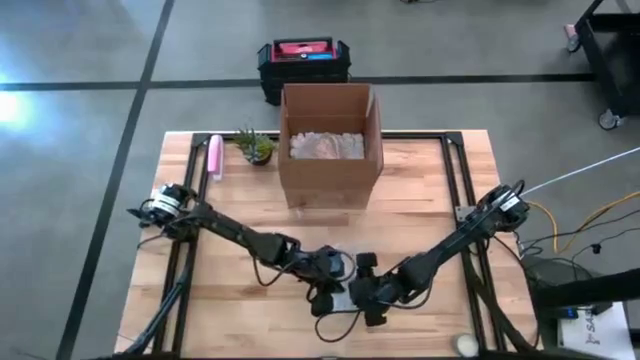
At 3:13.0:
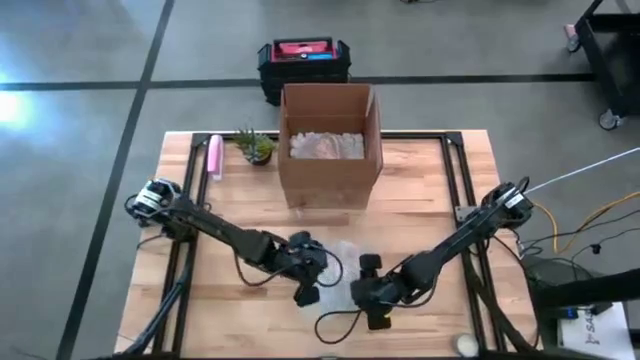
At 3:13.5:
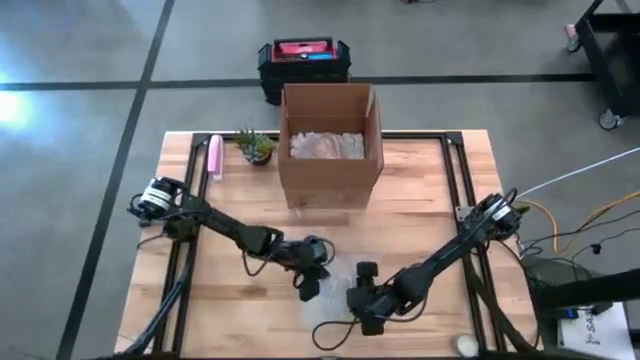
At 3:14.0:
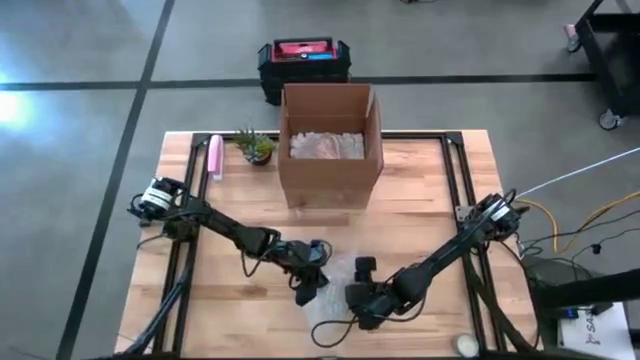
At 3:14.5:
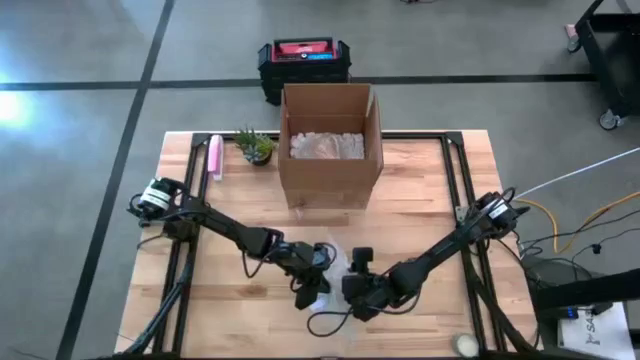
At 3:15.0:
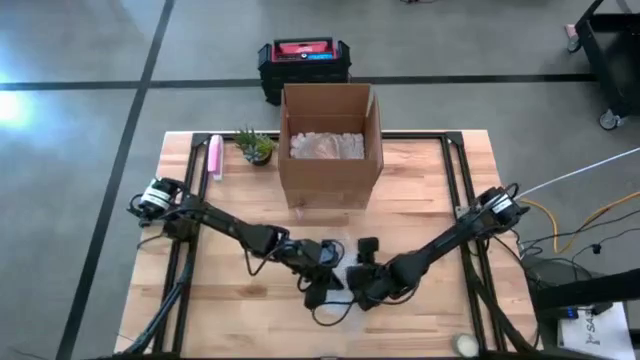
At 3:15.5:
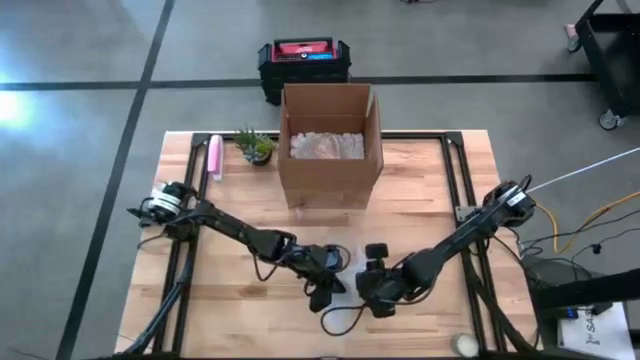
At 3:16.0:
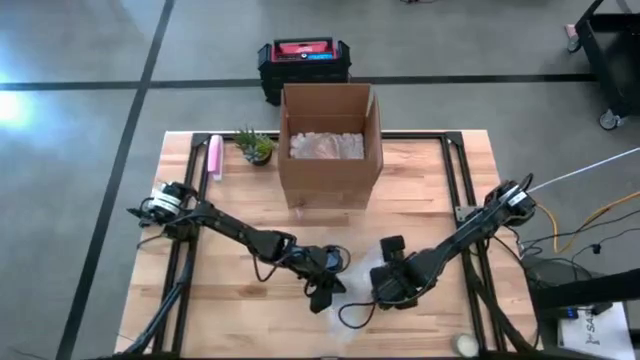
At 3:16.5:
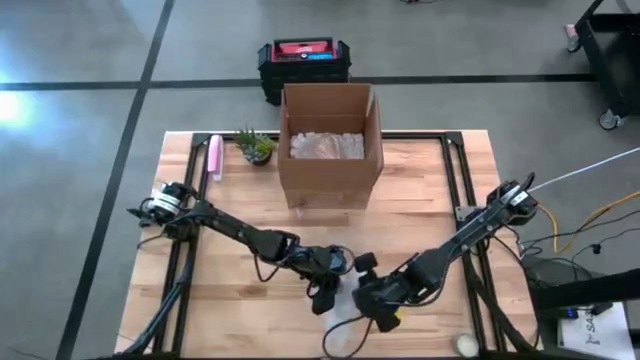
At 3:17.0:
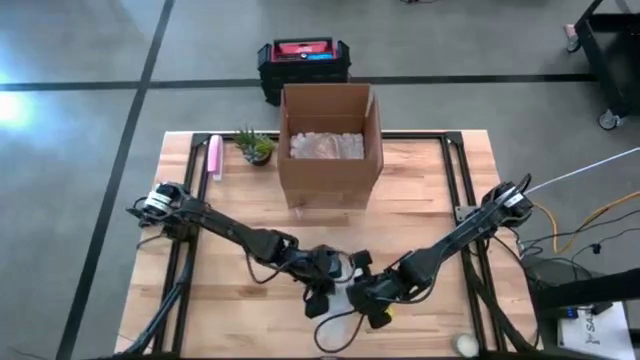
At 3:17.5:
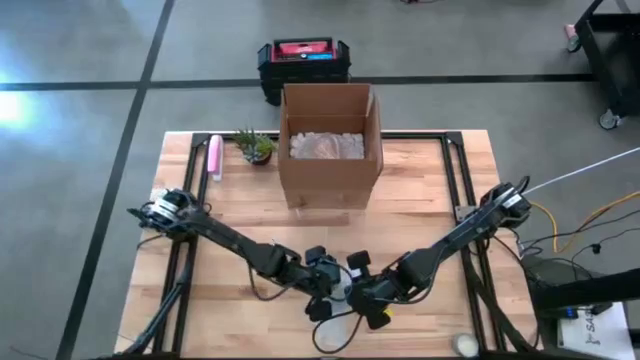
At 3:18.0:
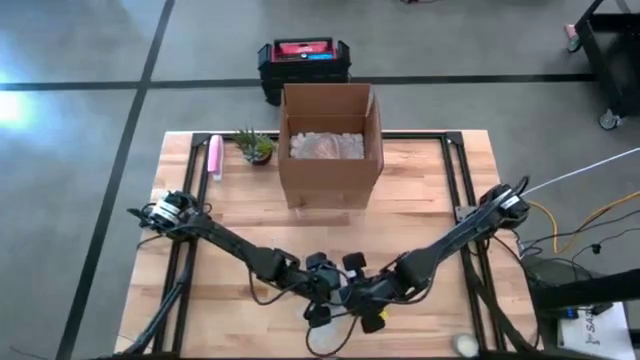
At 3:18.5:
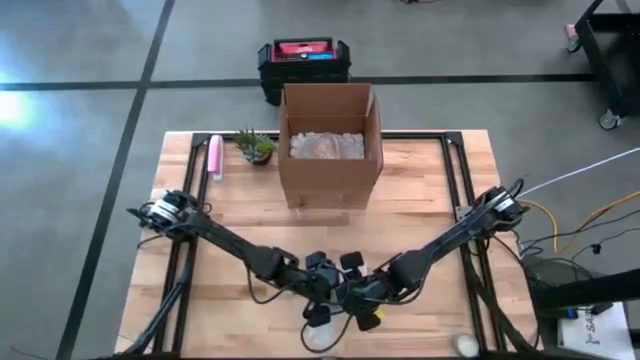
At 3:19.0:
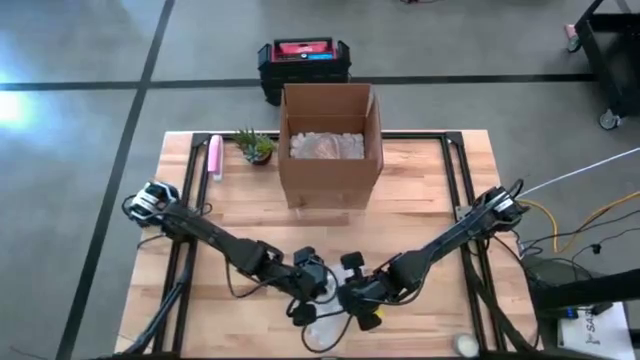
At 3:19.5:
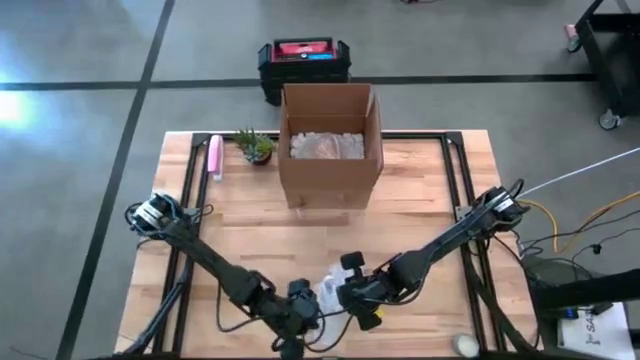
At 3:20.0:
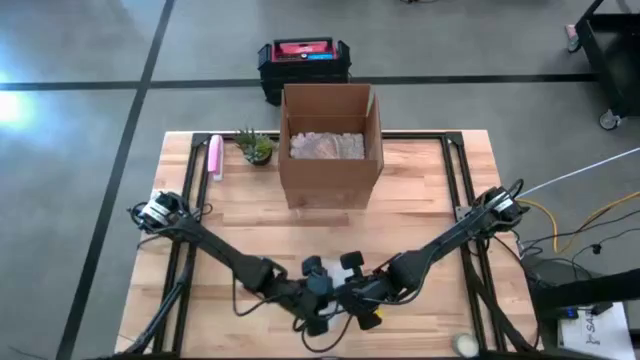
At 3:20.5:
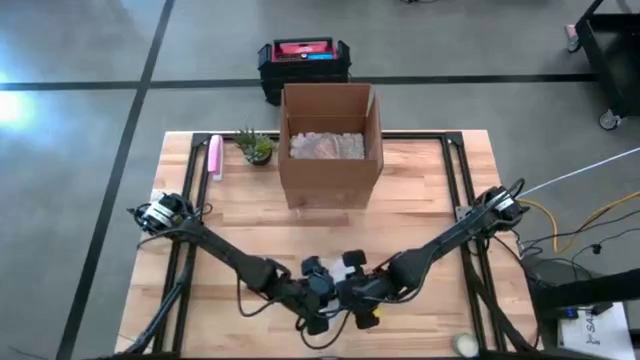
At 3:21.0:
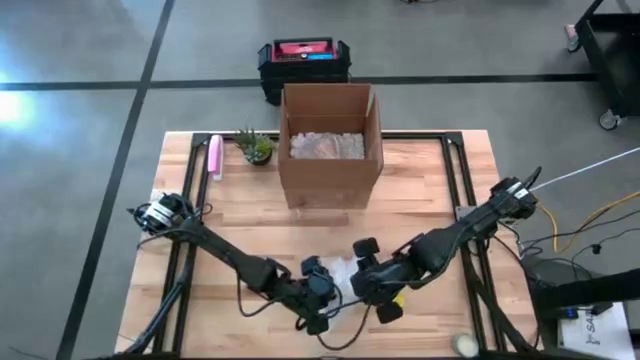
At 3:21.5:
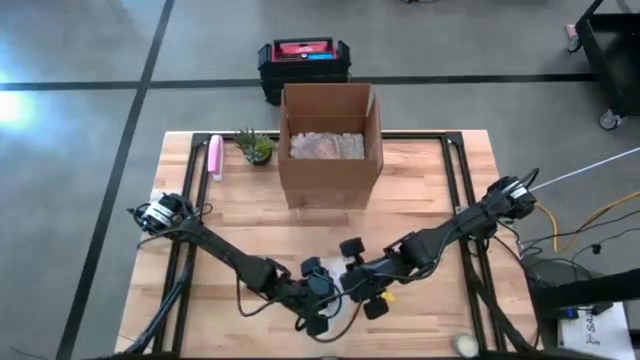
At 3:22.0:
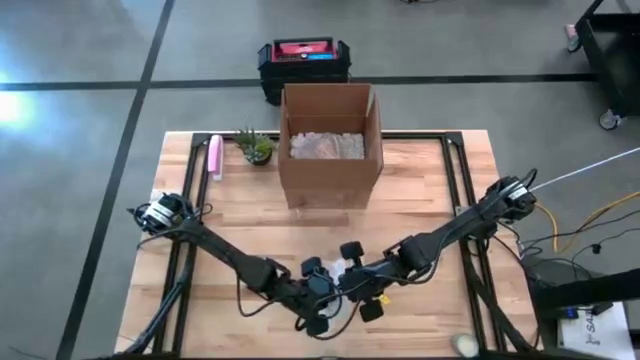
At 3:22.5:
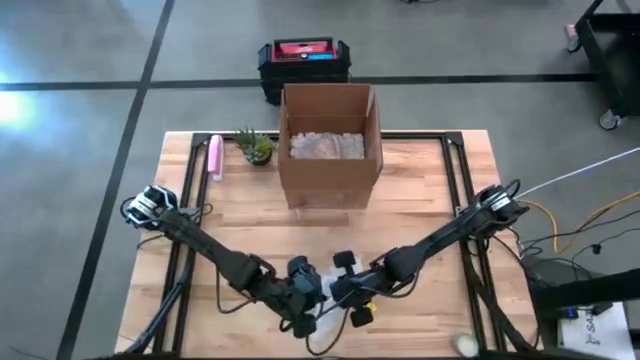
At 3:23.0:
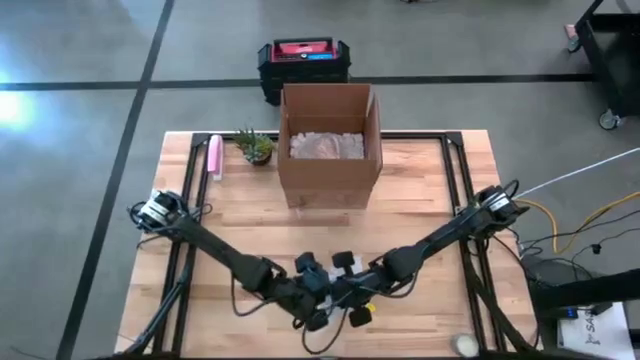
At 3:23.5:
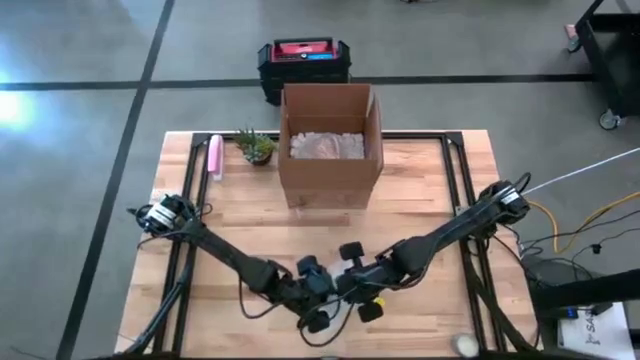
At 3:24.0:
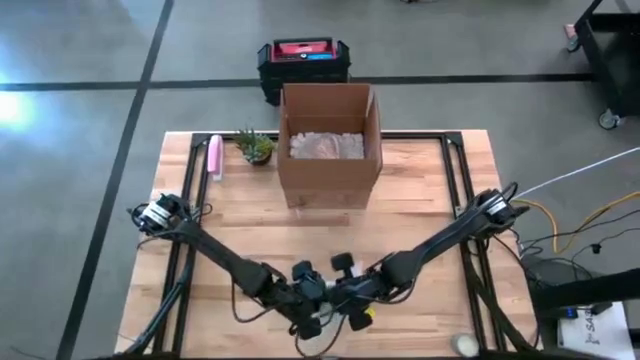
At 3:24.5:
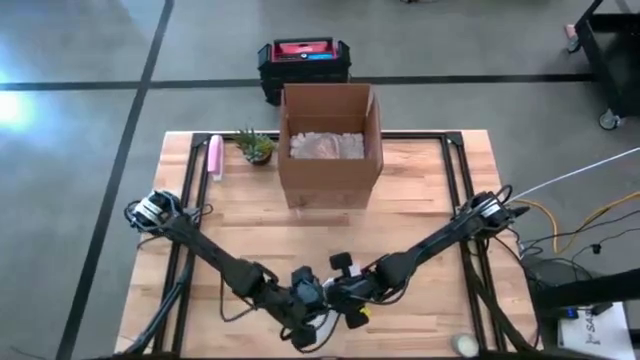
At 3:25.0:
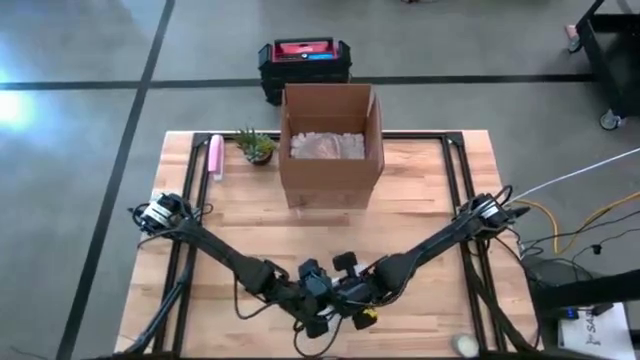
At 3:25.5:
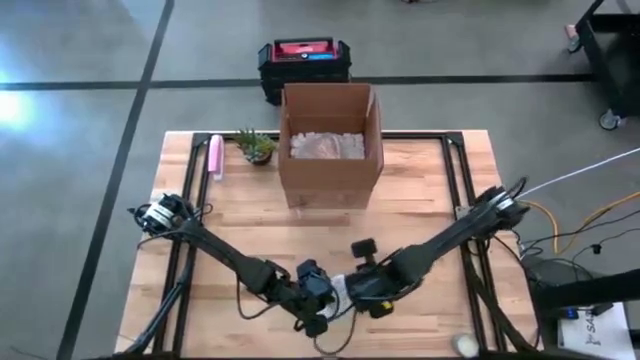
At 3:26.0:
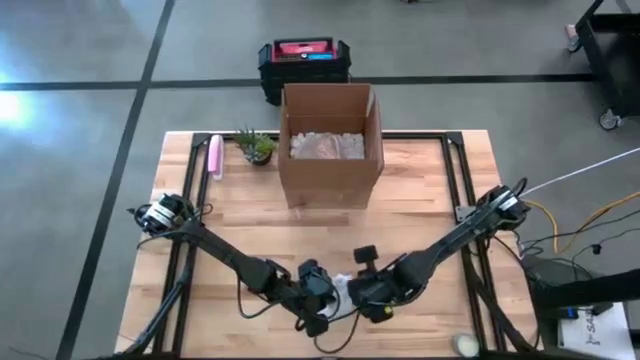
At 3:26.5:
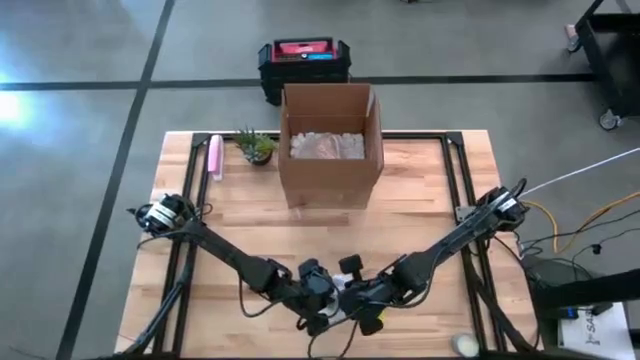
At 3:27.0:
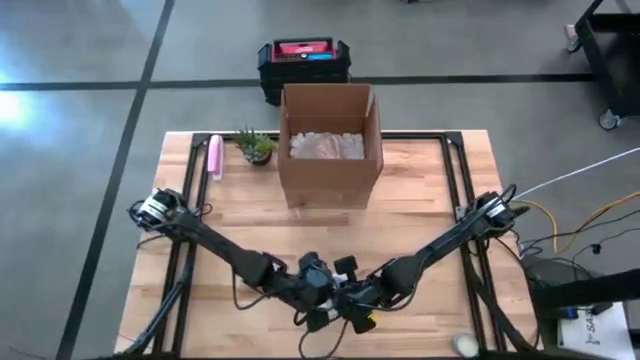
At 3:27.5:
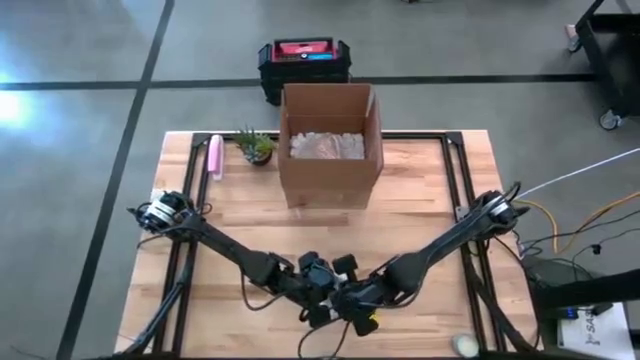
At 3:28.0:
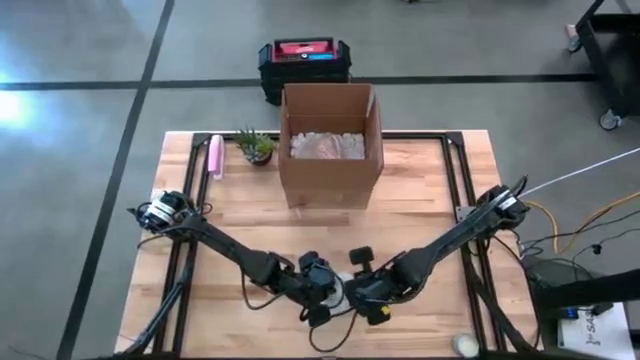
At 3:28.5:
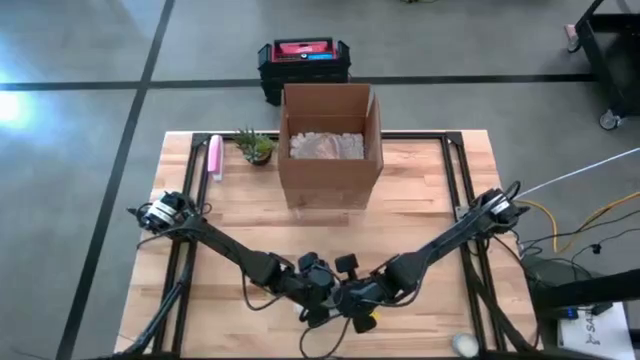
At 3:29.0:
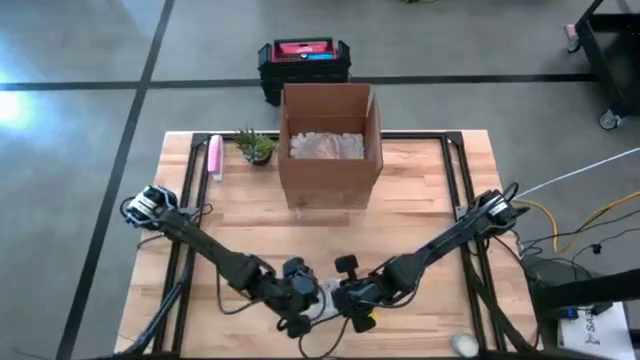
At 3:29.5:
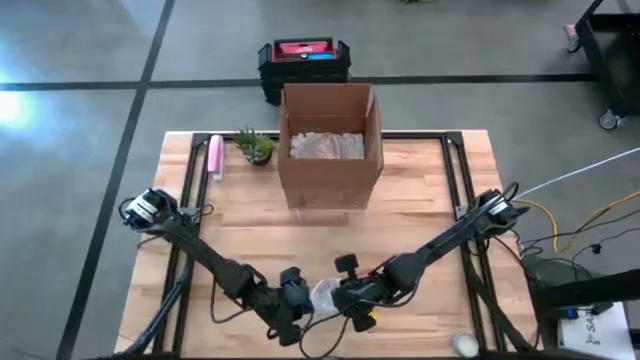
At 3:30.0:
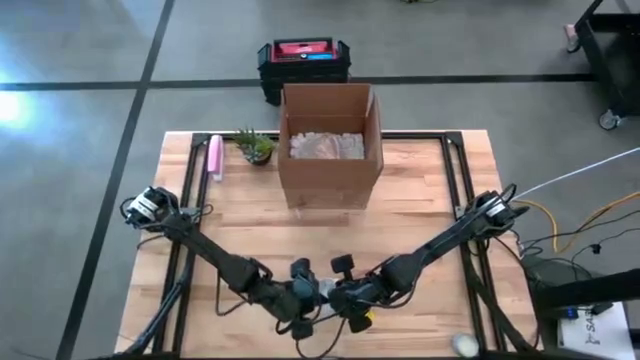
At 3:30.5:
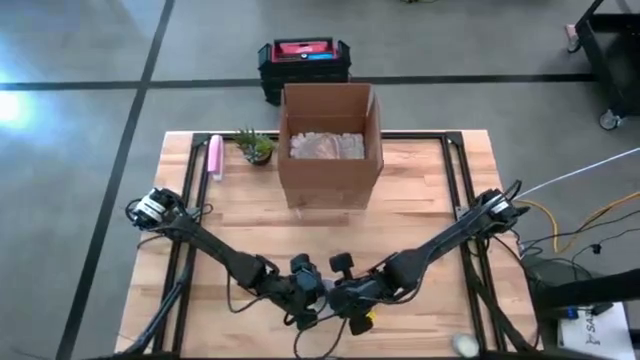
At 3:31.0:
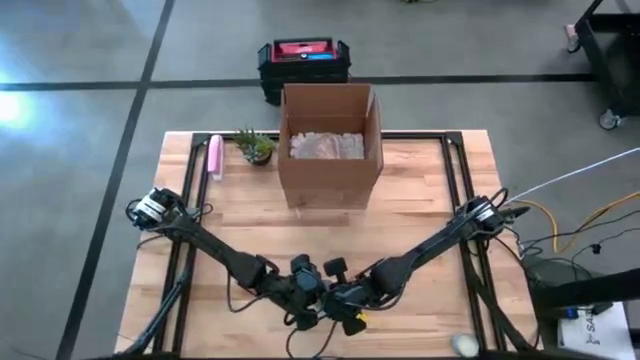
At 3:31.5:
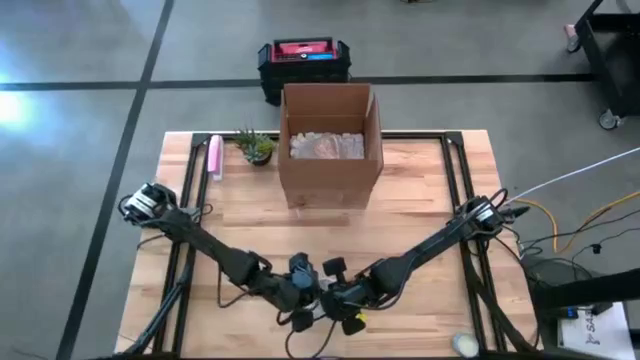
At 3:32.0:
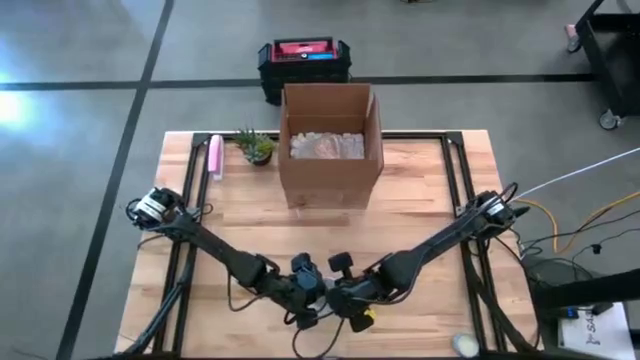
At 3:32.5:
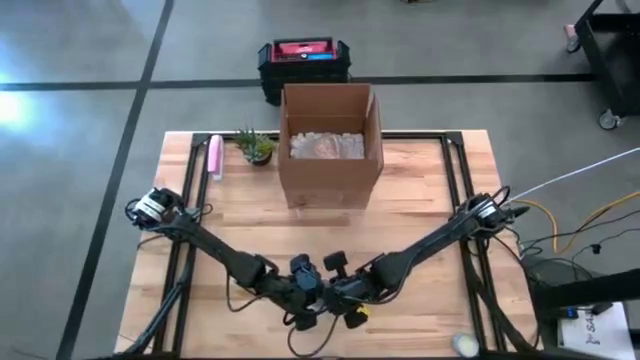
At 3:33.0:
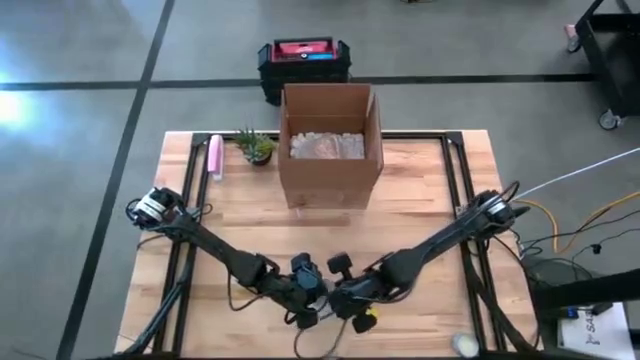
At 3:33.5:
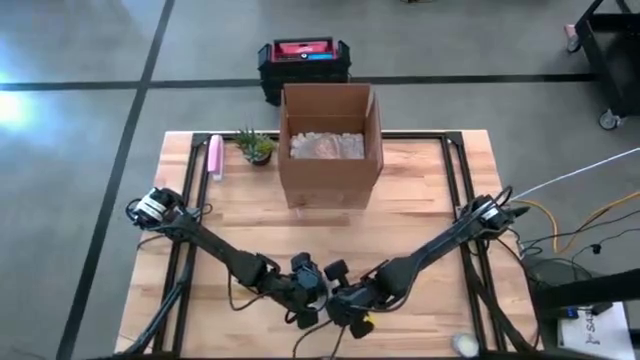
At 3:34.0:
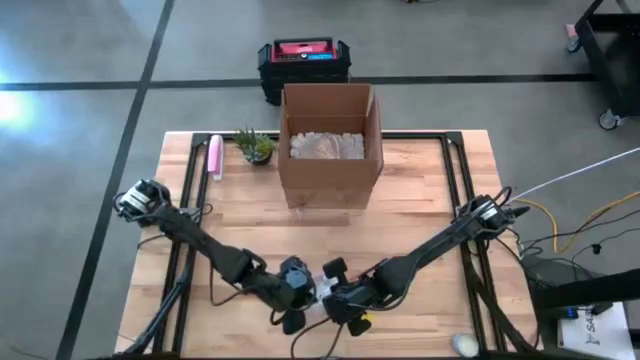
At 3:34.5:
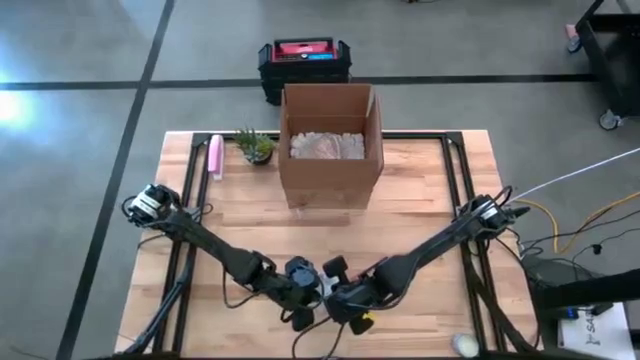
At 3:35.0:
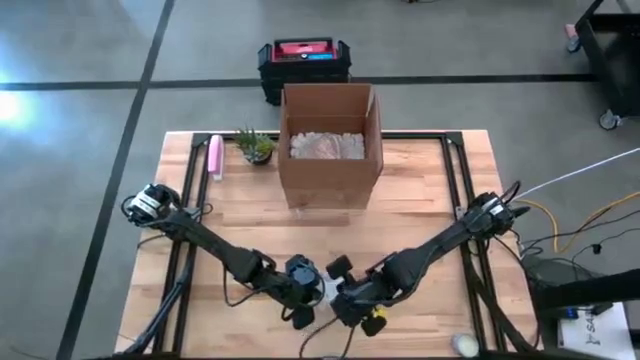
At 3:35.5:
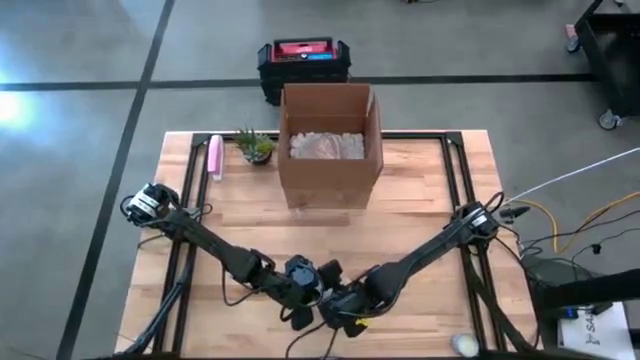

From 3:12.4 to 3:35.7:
Task: wrap mug
Wrap the gray mug with the bubble wrap
